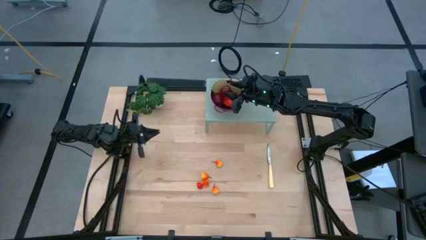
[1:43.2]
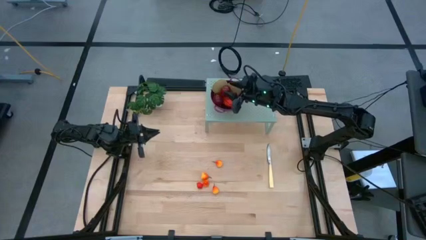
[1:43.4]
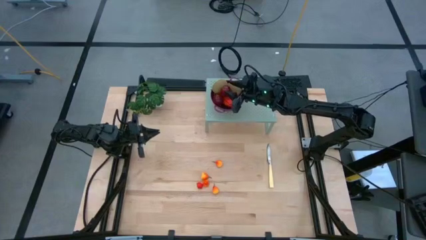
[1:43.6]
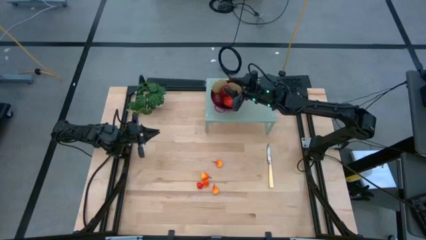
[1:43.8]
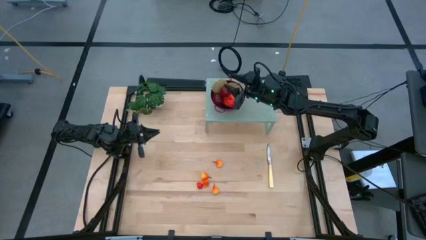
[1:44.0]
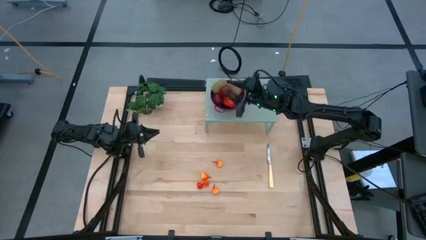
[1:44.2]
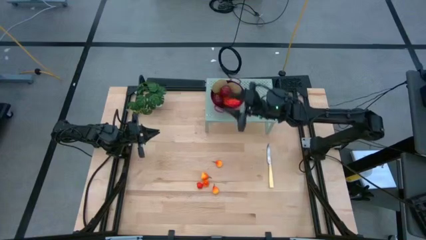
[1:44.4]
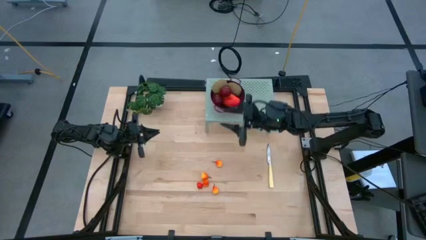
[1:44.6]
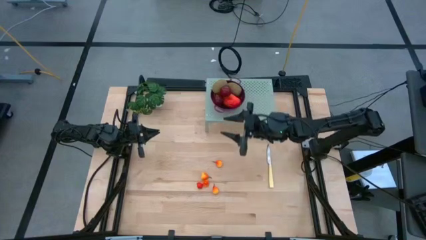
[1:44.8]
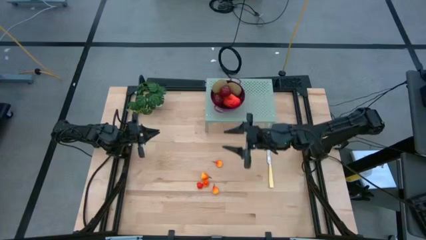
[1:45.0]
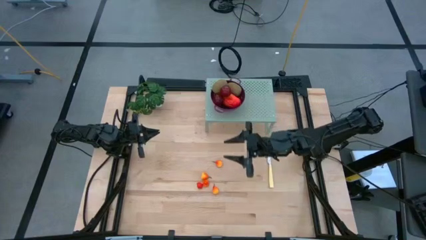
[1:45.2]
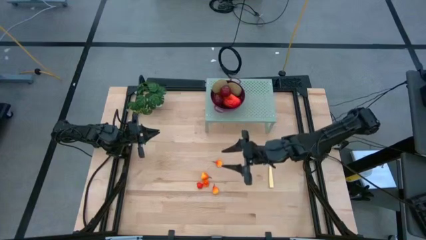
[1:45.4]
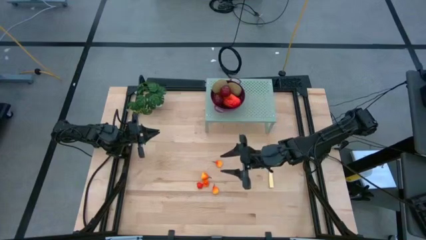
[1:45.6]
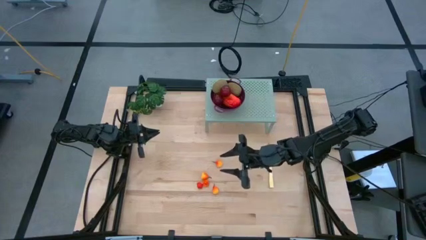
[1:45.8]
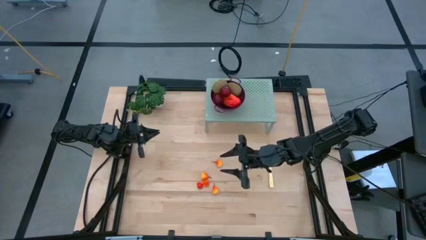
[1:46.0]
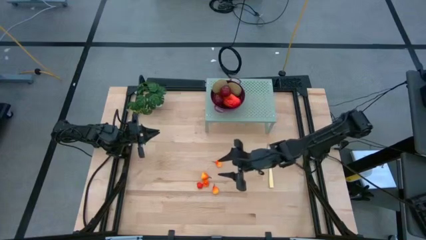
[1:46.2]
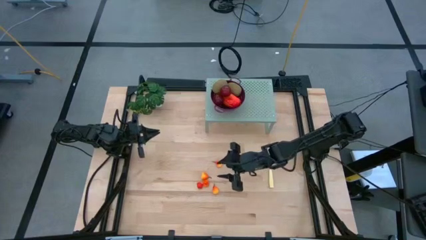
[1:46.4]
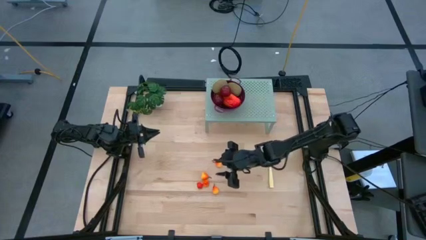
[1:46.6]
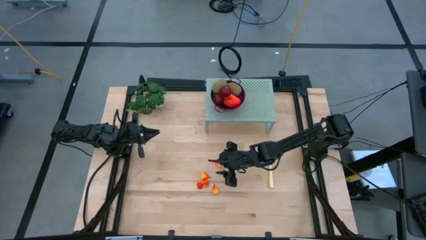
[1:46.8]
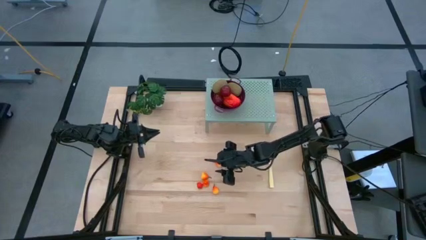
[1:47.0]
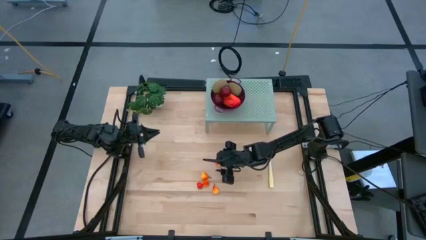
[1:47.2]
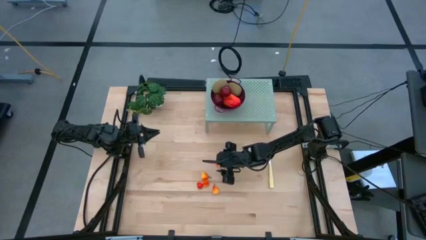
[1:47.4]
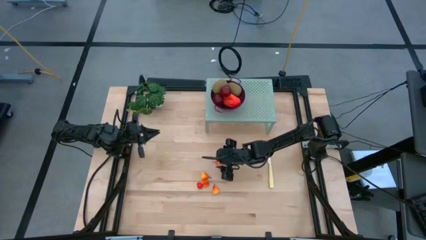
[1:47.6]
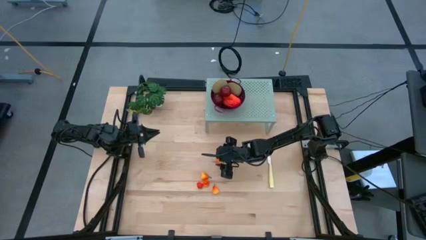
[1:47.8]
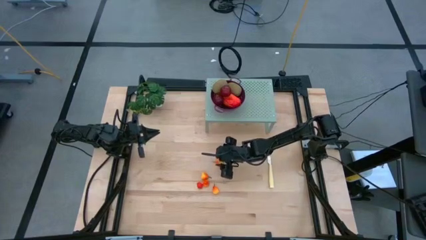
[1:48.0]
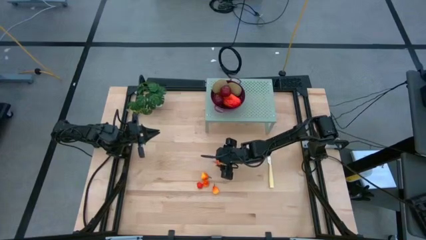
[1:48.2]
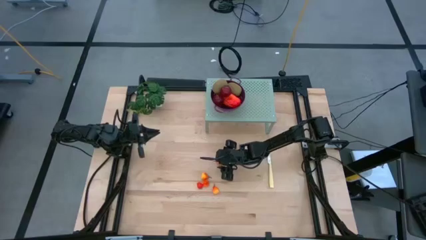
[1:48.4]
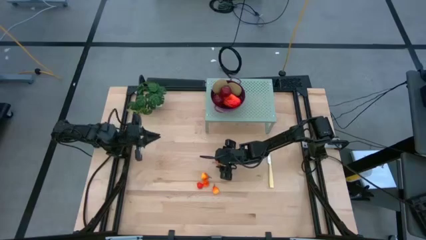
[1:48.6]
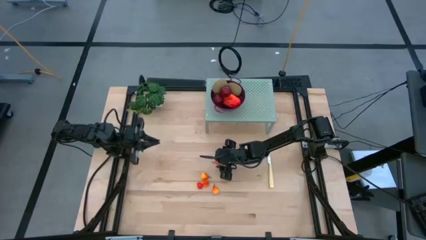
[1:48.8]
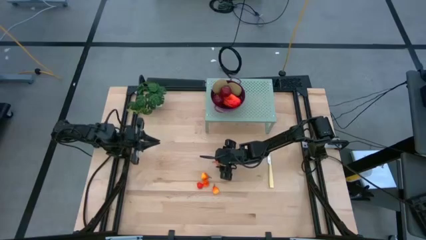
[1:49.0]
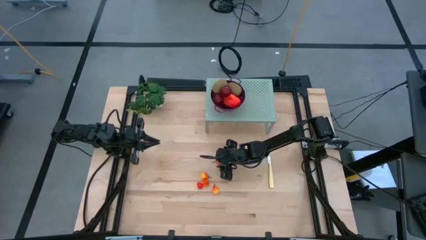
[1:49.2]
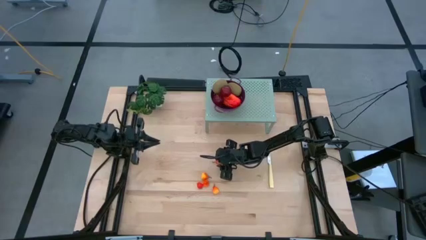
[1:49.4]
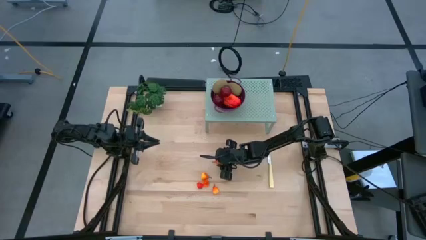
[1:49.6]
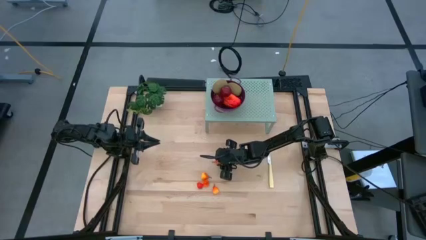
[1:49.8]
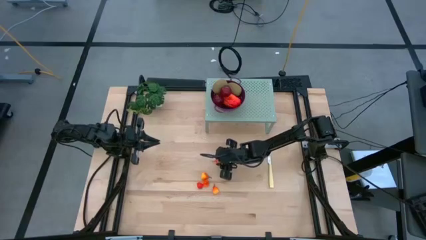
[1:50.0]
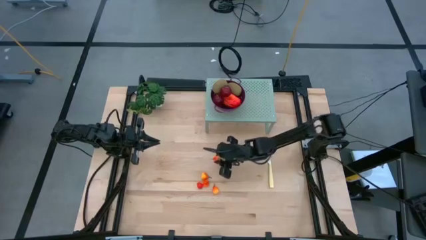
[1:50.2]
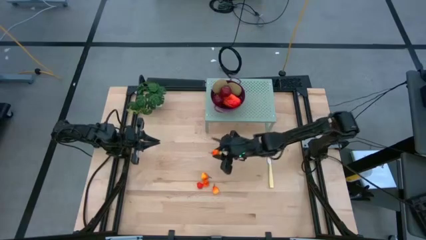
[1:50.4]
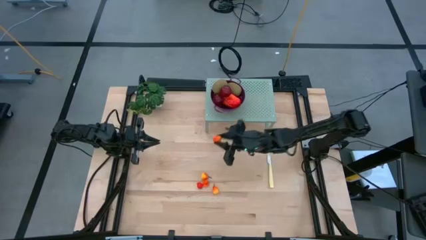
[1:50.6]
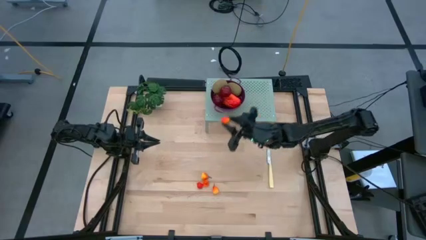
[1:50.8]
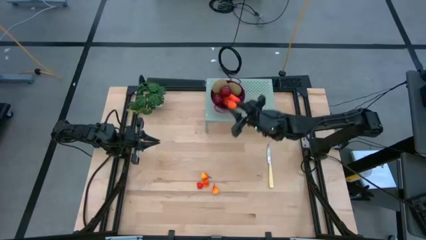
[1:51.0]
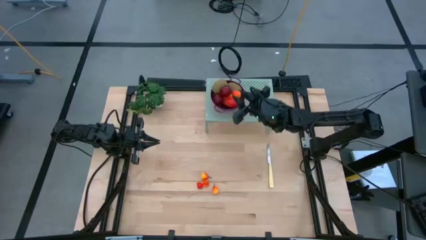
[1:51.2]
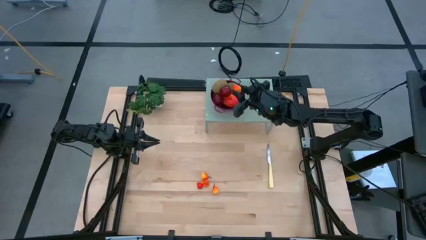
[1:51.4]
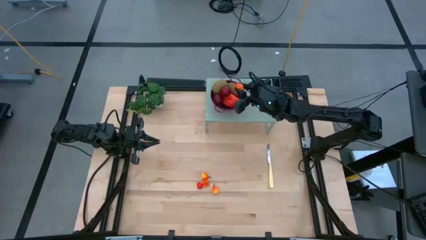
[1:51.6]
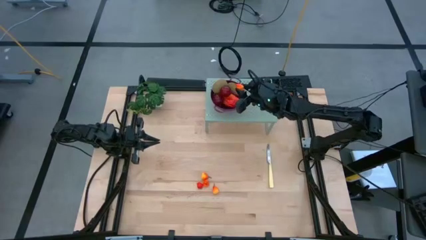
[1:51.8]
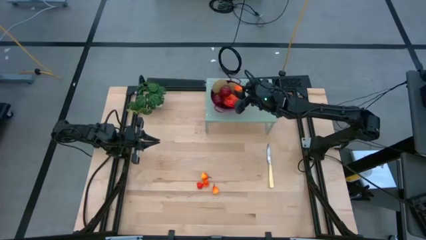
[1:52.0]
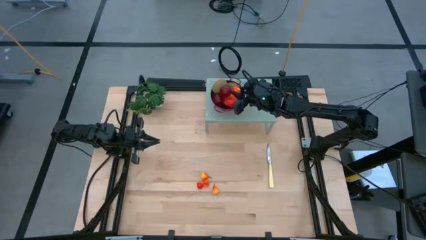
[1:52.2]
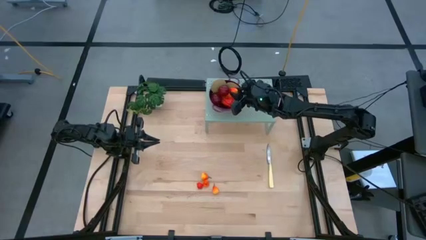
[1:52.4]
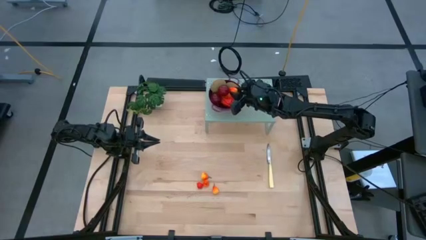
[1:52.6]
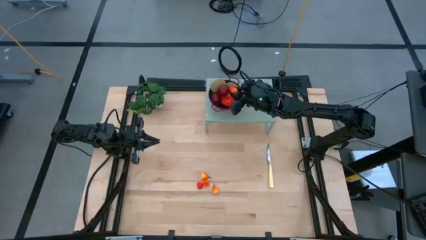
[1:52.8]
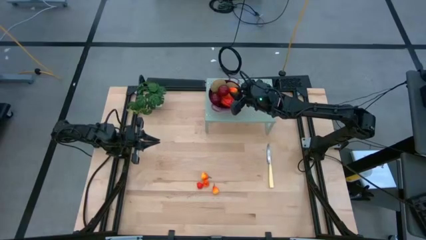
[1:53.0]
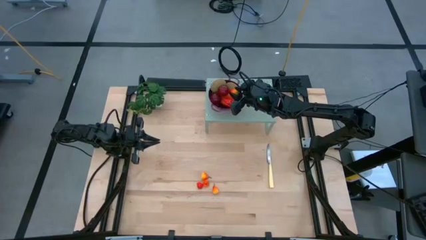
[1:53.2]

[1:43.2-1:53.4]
Task: Pick & Place Fruit
Put the pear into the dark red colander on the shelf
